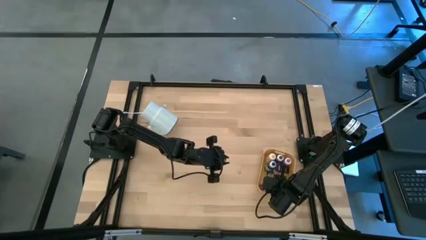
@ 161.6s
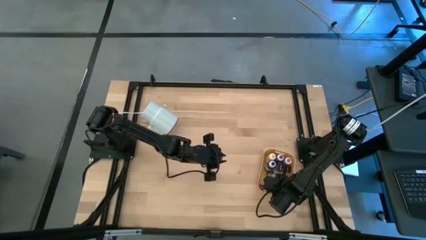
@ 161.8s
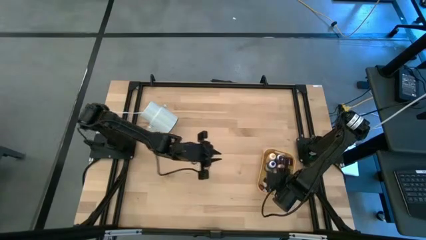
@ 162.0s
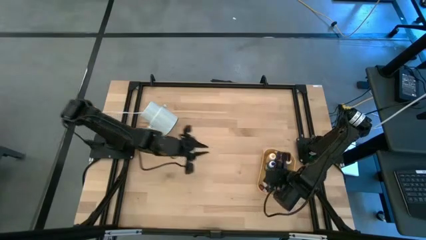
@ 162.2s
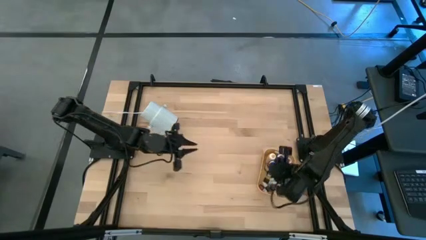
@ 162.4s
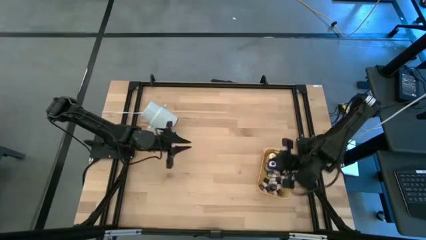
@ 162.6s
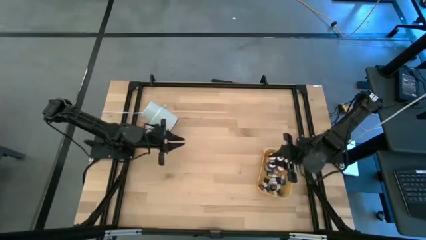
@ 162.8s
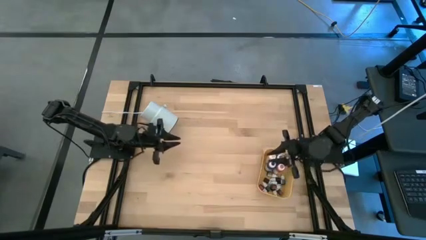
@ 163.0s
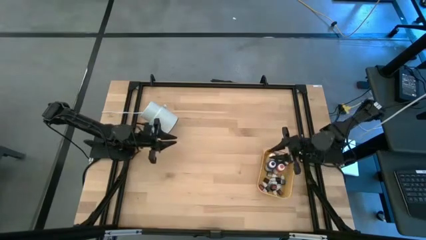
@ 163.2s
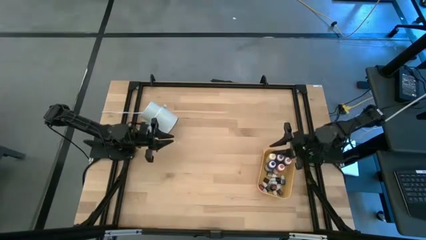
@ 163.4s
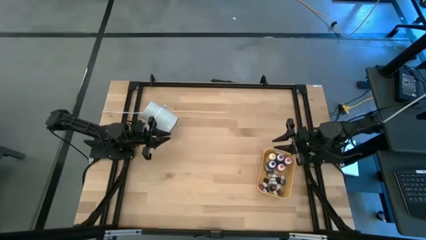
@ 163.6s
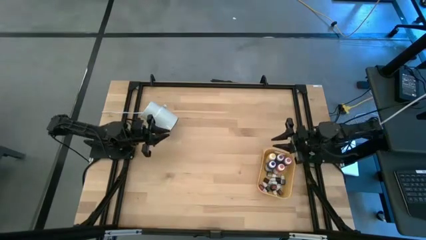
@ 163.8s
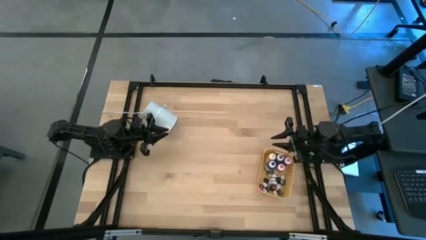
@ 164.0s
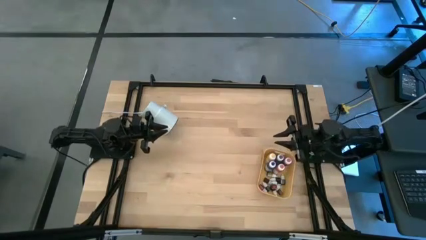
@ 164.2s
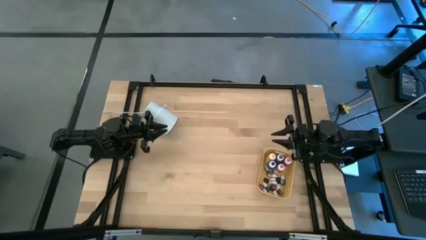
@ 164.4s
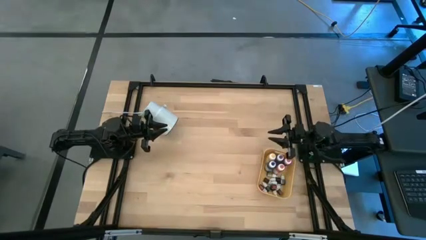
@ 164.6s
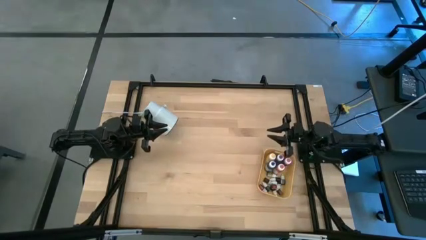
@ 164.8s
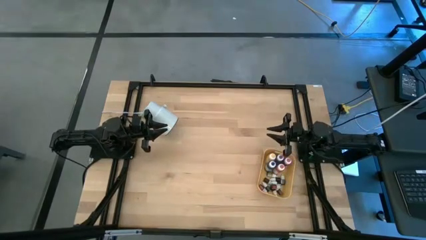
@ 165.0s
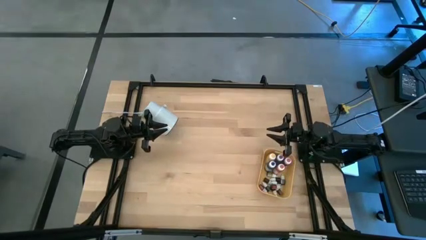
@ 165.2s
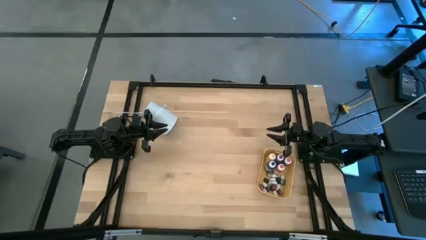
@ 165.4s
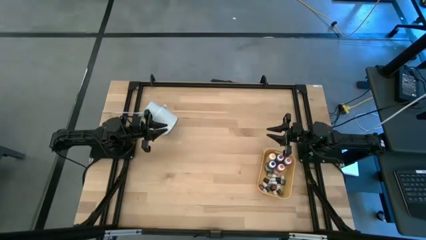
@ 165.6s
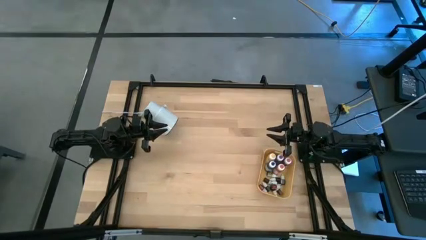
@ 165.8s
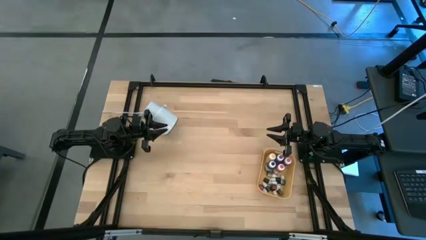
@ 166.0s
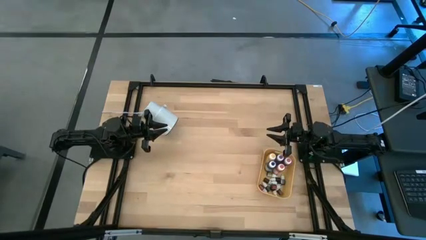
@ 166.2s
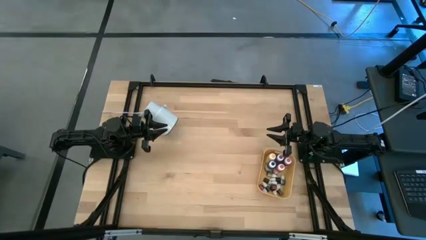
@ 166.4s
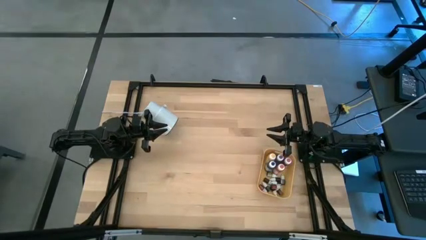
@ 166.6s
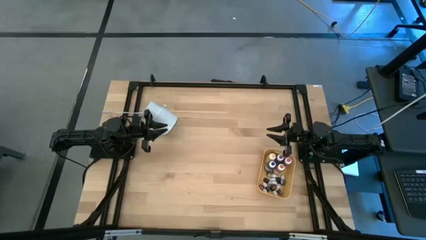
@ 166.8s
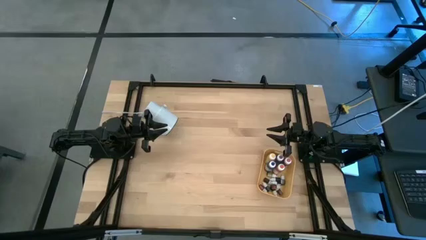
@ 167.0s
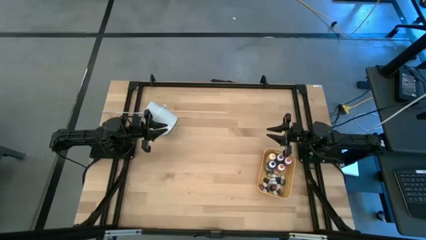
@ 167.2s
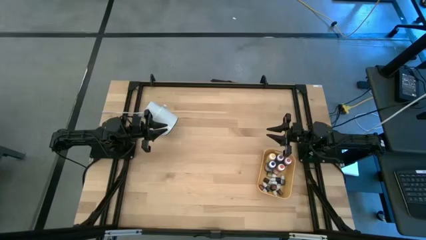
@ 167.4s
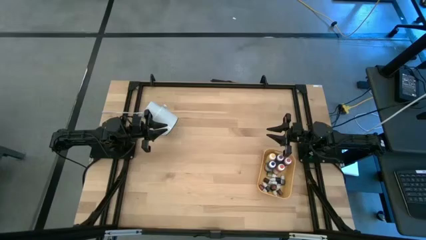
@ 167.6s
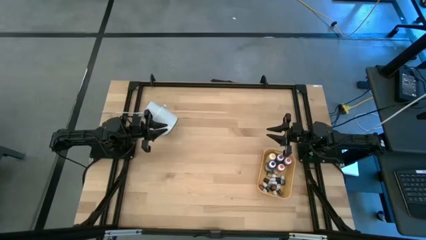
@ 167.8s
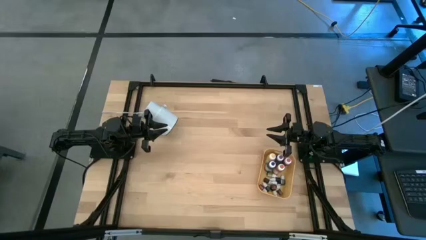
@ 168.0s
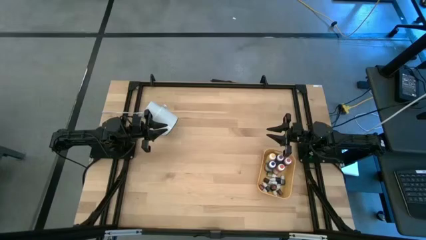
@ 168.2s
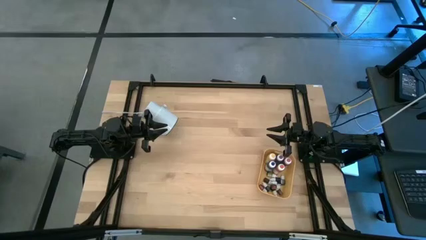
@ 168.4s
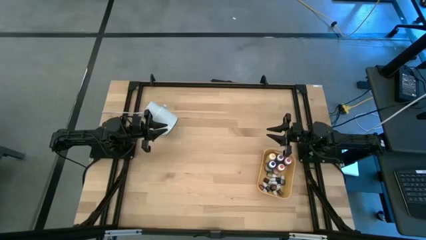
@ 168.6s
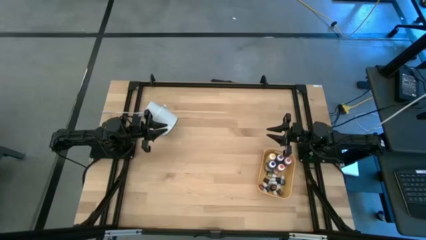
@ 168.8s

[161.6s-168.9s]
Task: Pick & Place food coloring
Return to Home Position

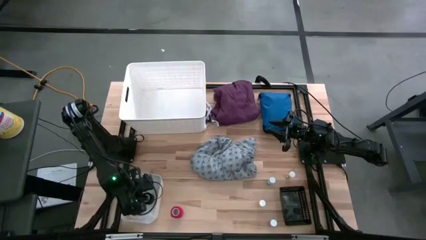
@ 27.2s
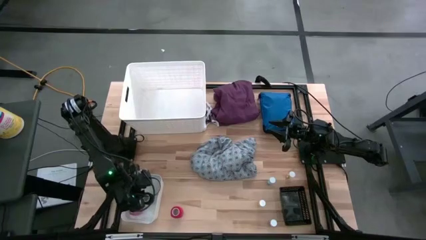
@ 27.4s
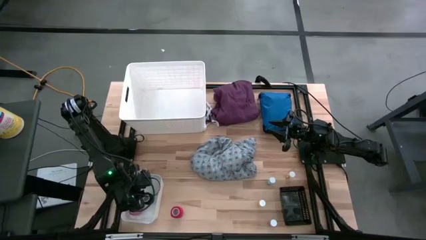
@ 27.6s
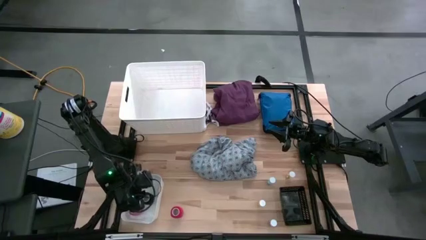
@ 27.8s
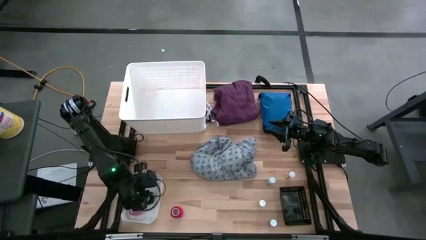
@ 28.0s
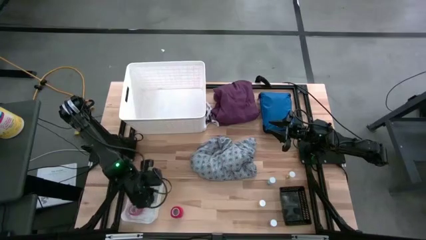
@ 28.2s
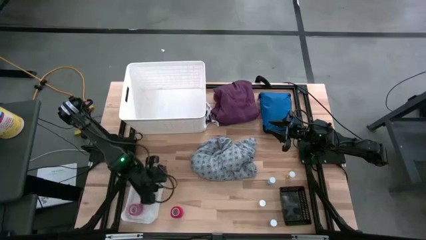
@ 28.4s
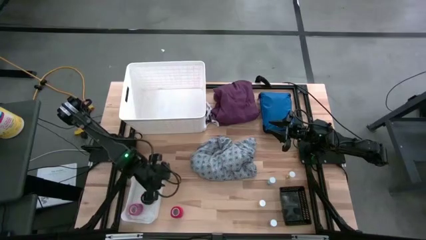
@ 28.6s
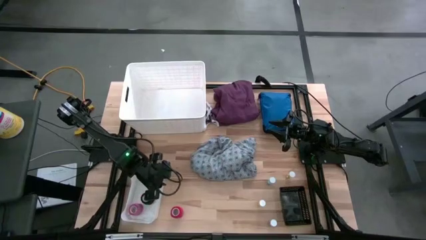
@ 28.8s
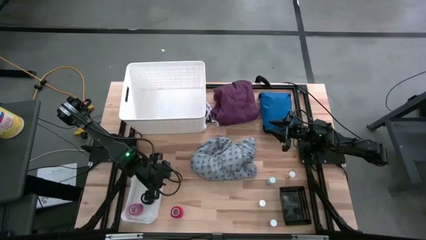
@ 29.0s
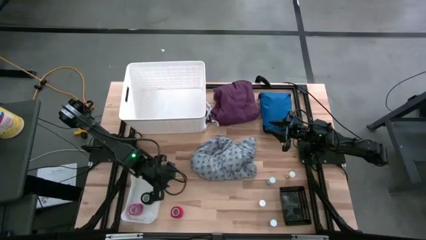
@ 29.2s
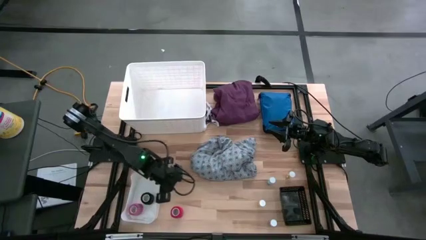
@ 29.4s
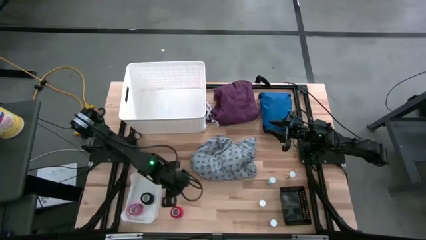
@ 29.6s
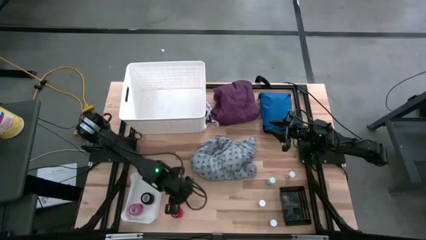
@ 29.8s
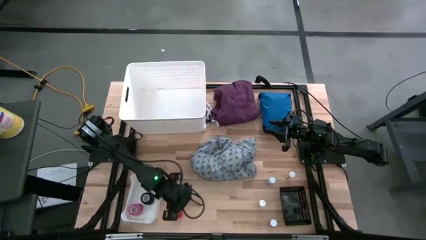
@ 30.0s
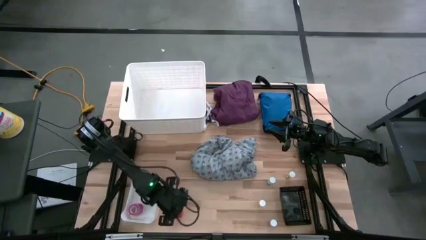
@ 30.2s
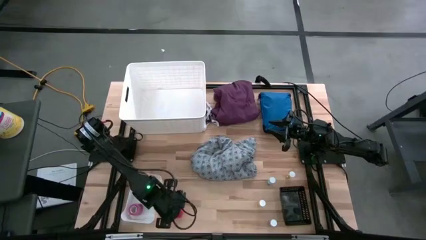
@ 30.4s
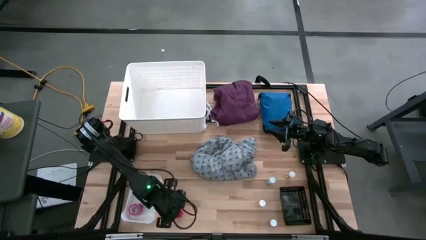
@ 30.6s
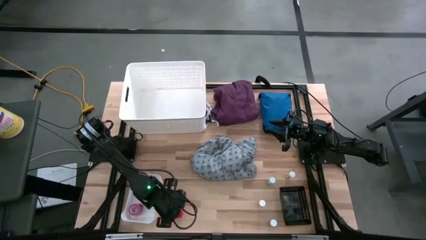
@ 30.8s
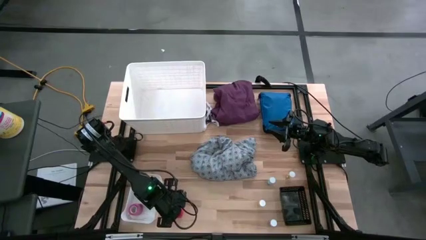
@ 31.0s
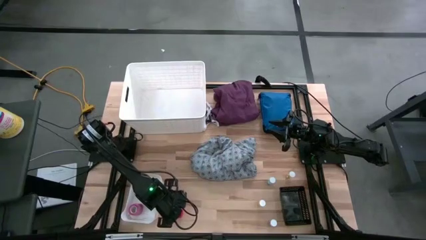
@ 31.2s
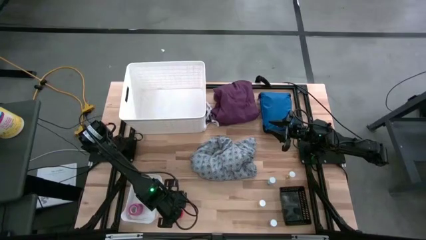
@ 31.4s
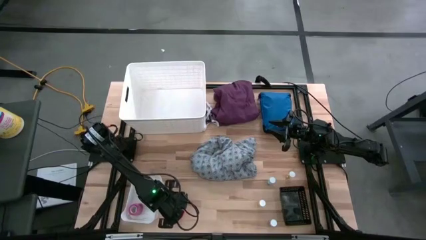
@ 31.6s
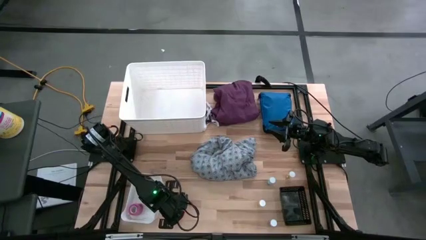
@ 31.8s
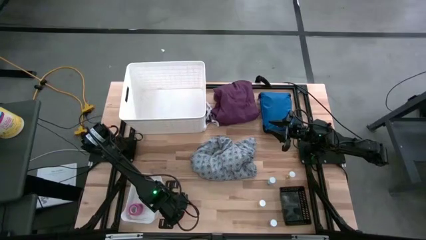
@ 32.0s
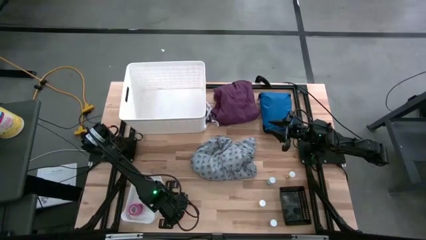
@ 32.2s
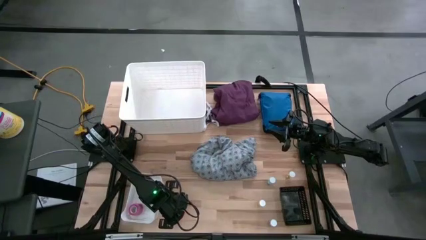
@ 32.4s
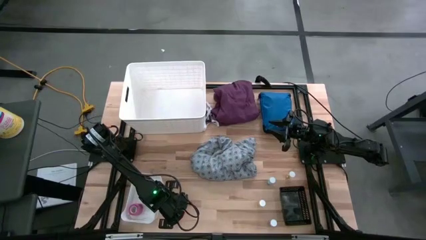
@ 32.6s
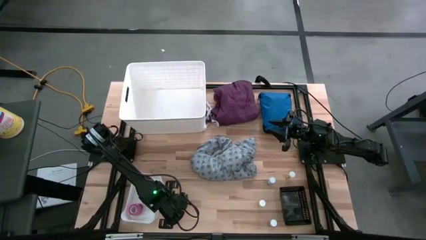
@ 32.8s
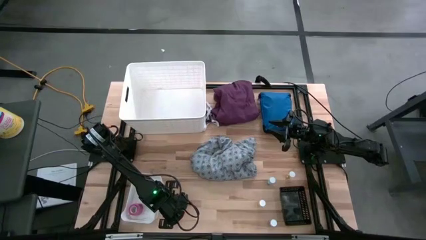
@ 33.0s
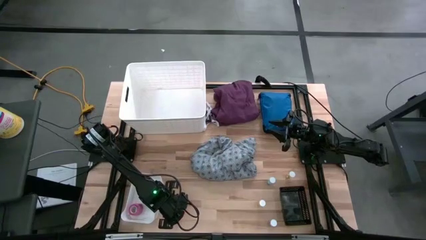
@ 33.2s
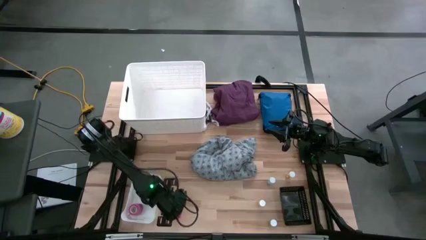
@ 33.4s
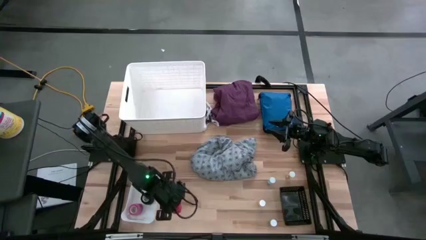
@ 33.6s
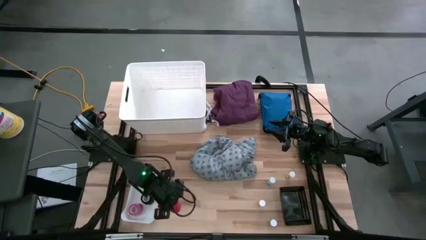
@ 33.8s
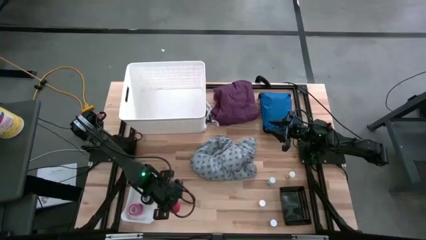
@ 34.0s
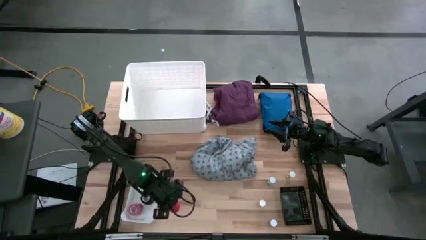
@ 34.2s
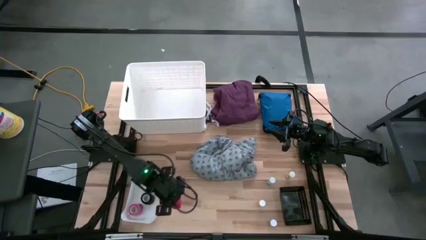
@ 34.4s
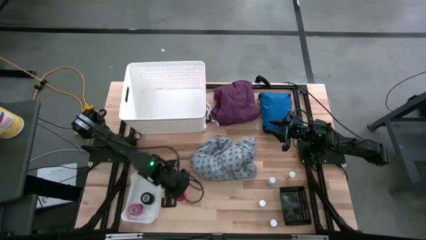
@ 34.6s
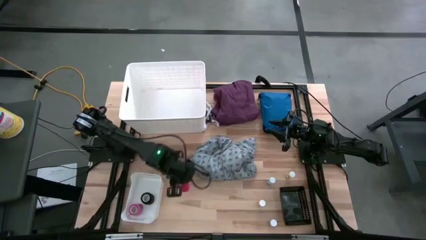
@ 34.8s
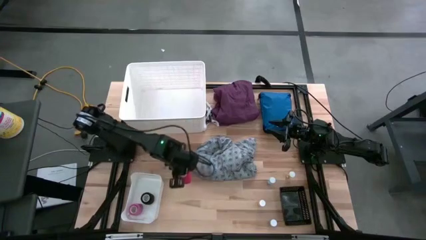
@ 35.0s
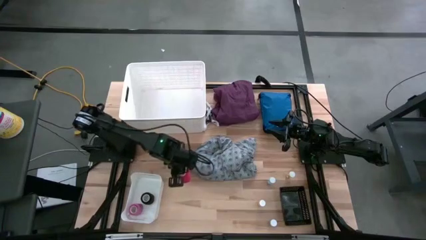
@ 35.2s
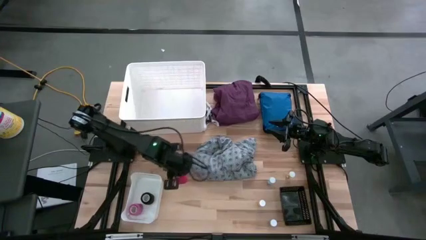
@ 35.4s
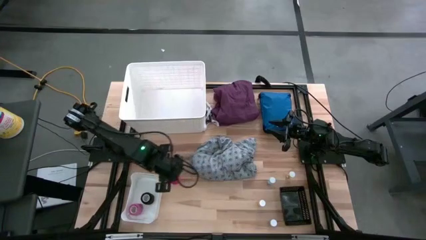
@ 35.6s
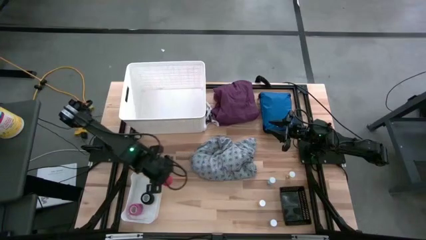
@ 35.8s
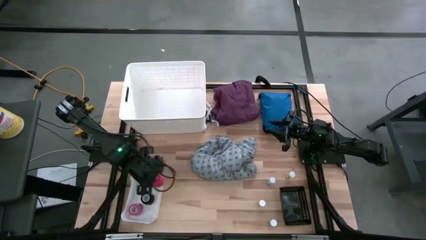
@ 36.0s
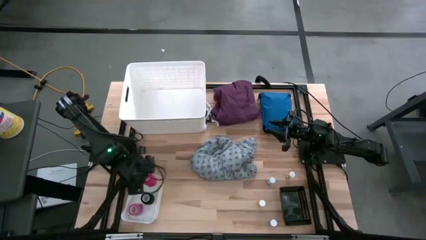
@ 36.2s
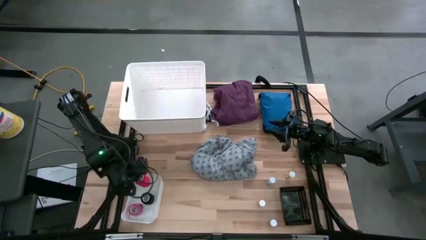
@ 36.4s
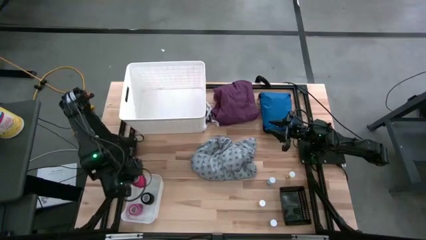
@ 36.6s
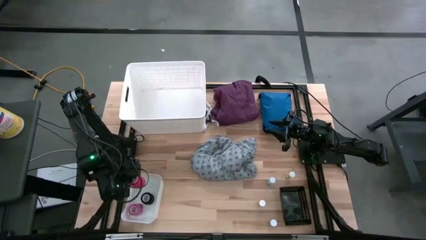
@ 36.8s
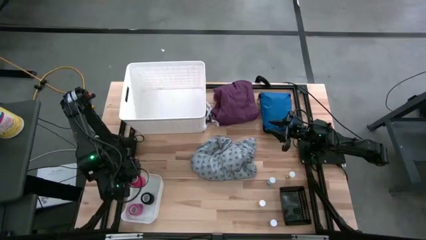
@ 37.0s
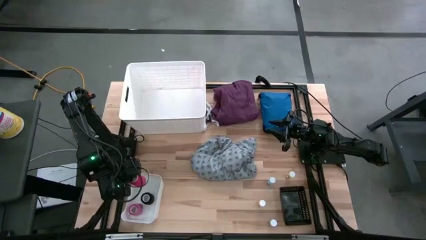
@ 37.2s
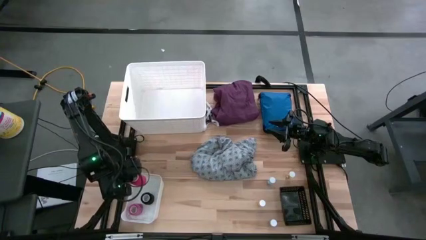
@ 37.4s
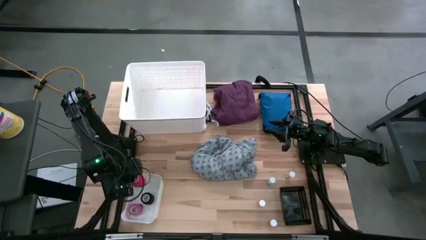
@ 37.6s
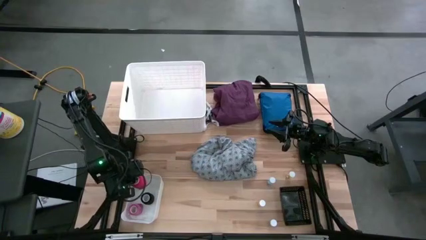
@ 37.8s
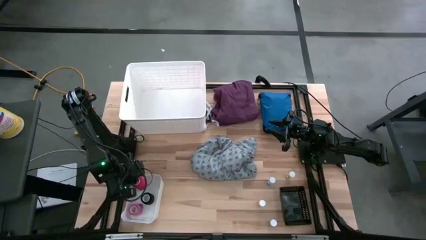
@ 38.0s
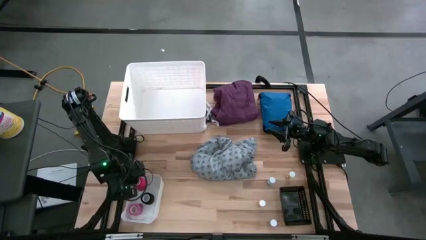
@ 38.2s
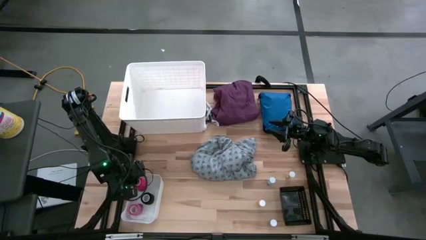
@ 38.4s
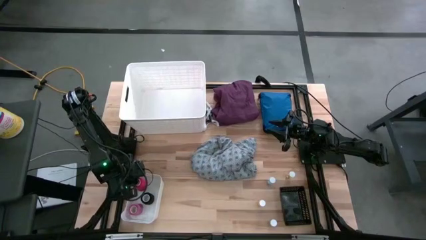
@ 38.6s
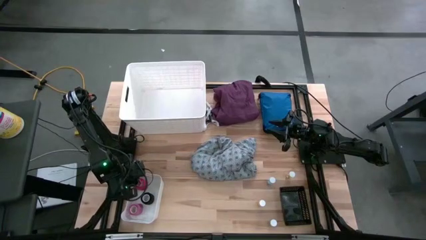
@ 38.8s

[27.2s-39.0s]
Task: Pick & place medical supplies in basket/bin
Put the red bandage into the bottom white bin
